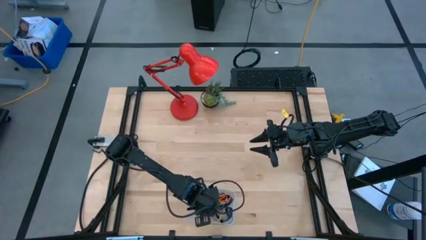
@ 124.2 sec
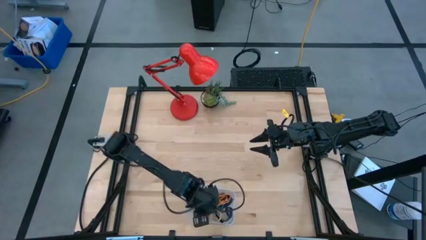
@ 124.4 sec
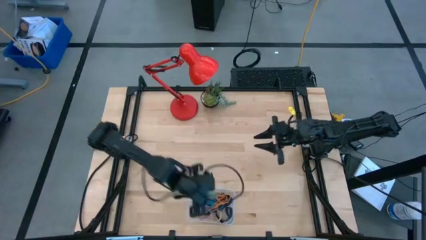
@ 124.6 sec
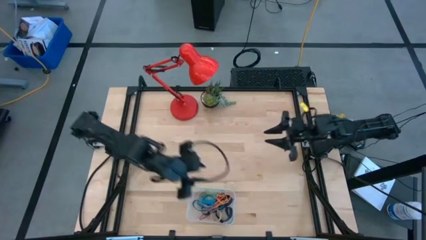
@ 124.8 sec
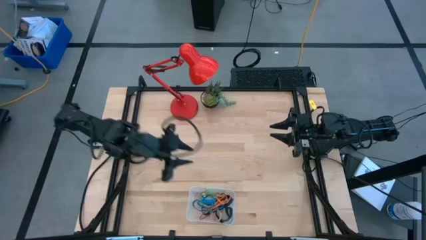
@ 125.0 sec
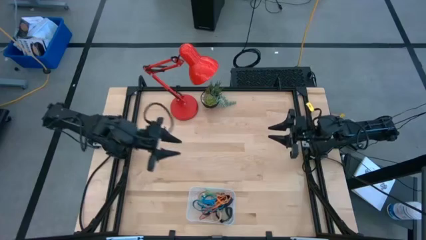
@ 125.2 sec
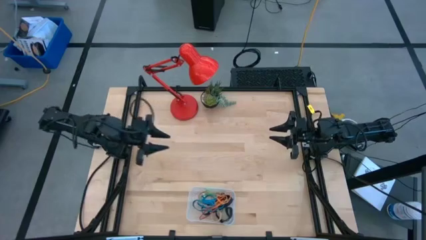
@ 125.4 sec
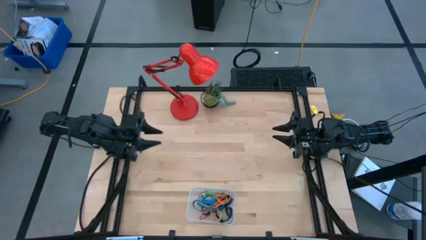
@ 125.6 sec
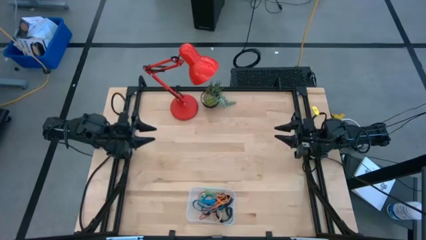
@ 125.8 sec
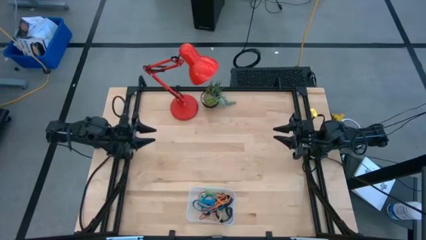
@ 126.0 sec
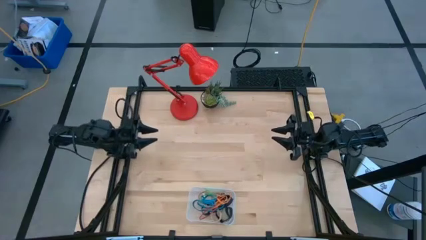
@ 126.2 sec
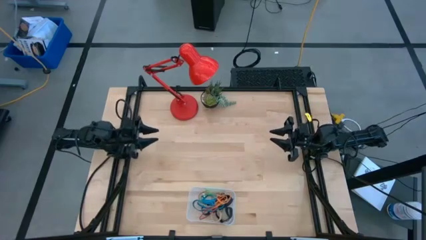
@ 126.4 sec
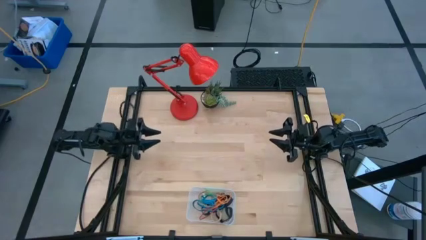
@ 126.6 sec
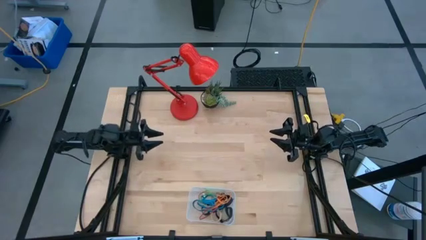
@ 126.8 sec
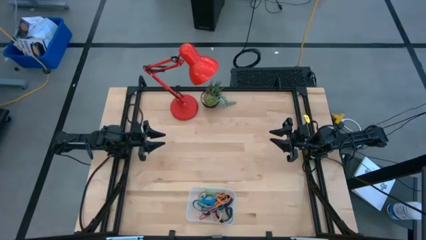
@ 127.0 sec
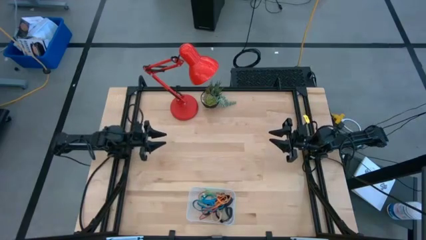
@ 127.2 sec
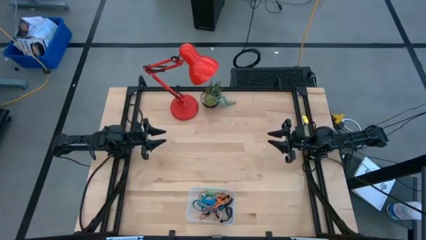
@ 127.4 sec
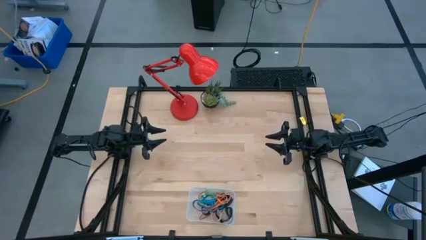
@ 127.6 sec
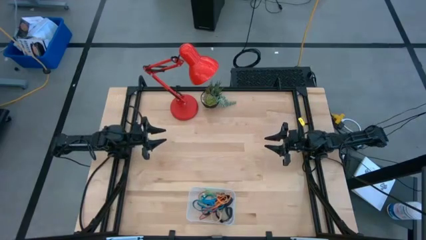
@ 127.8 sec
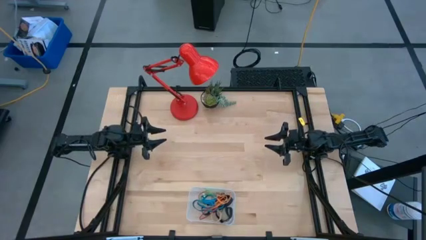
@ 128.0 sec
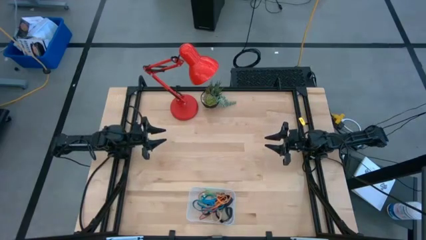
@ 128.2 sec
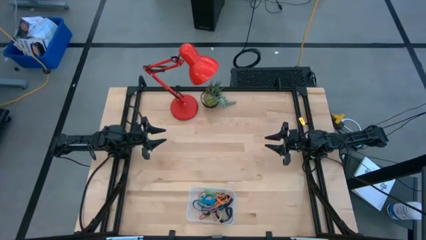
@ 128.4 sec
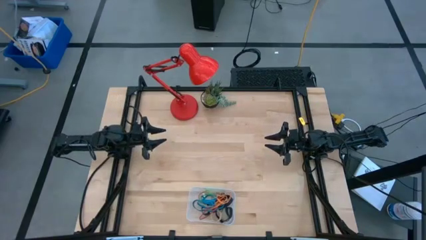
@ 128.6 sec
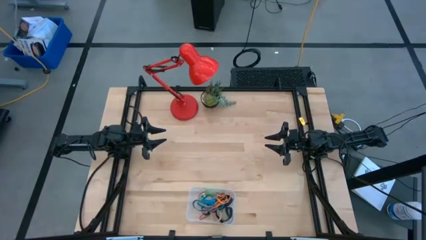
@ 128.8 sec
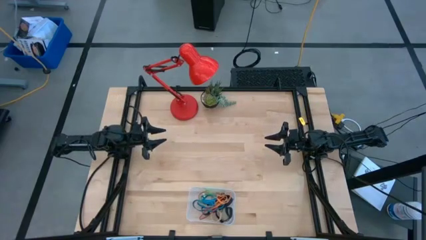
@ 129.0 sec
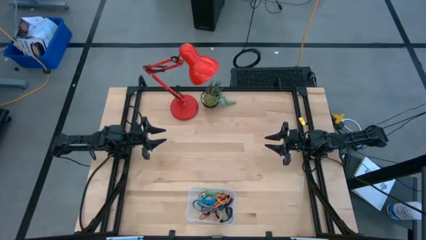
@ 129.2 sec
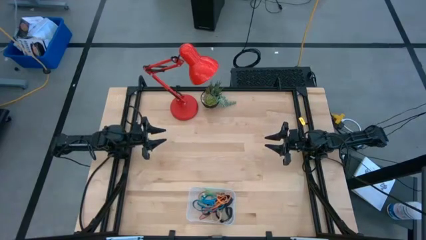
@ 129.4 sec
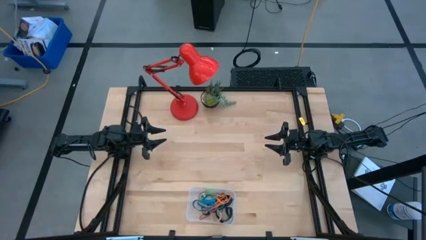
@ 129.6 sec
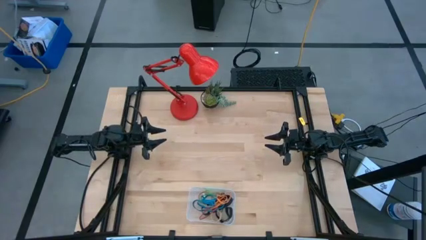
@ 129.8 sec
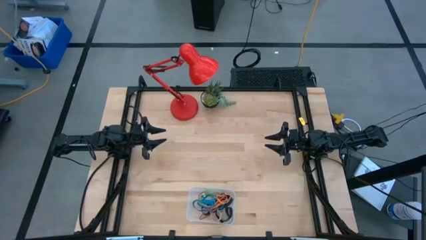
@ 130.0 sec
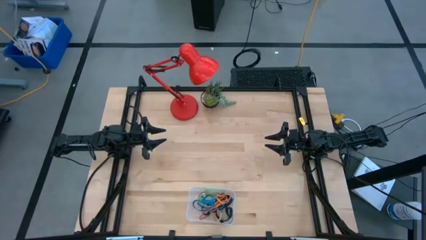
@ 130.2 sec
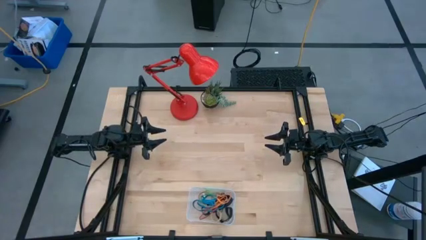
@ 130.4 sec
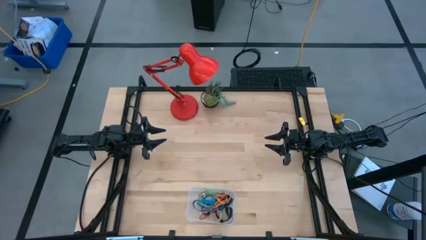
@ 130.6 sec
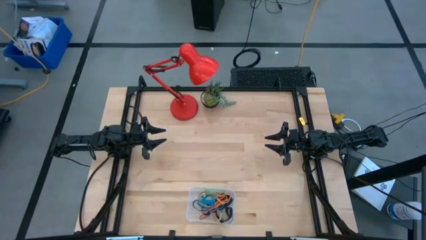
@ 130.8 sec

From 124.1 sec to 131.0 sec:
Task: Pick and place rubber bands into bin
Return to Home Position

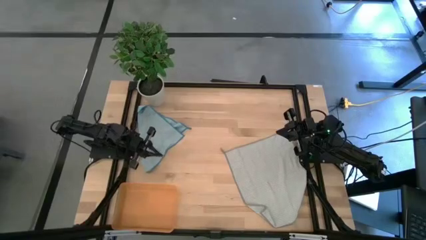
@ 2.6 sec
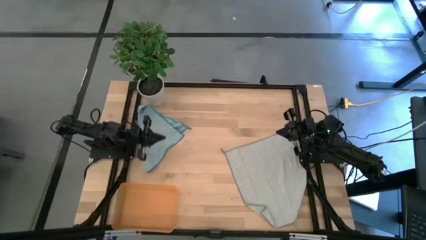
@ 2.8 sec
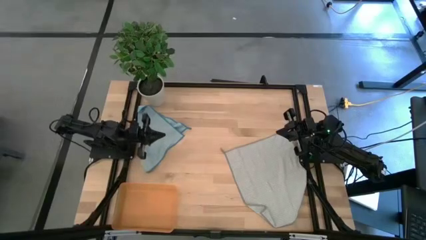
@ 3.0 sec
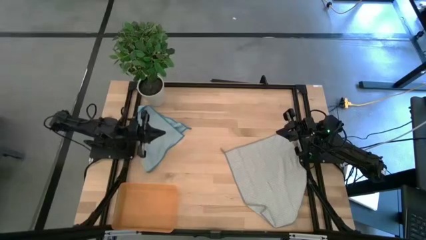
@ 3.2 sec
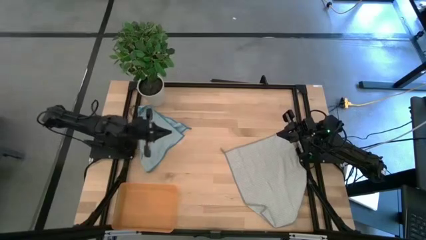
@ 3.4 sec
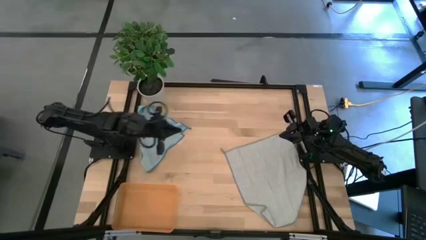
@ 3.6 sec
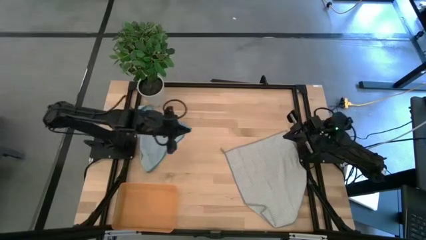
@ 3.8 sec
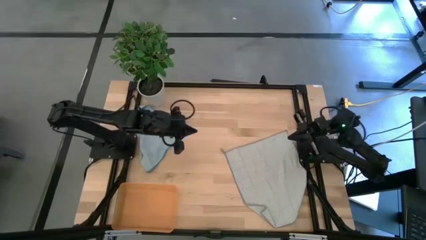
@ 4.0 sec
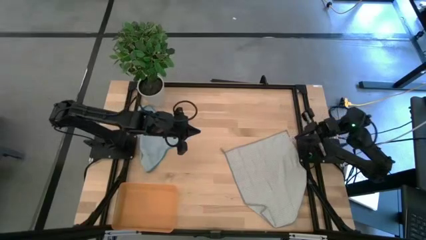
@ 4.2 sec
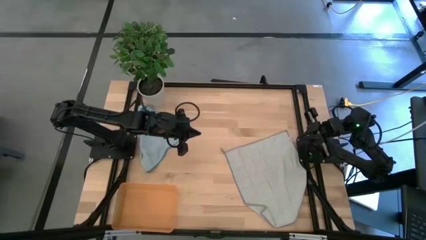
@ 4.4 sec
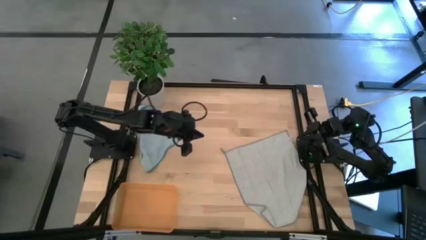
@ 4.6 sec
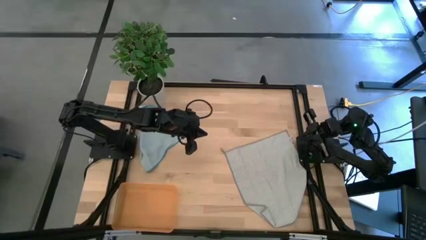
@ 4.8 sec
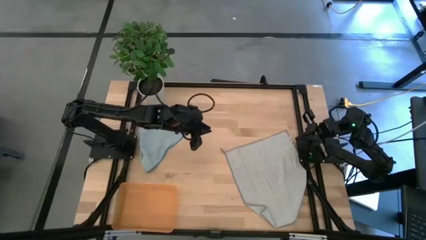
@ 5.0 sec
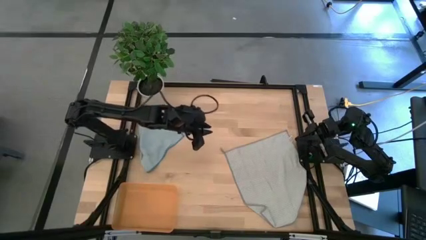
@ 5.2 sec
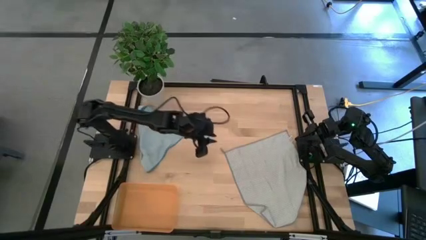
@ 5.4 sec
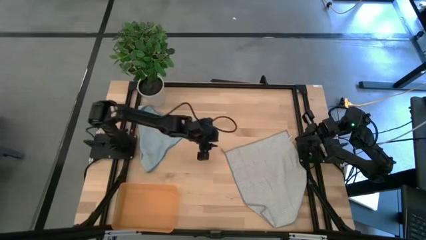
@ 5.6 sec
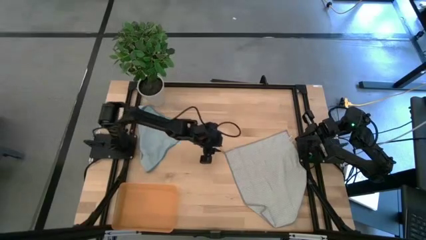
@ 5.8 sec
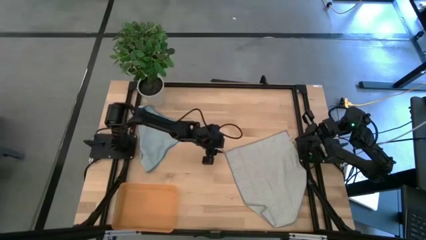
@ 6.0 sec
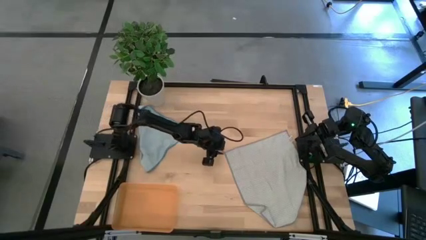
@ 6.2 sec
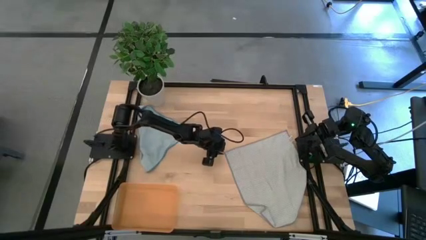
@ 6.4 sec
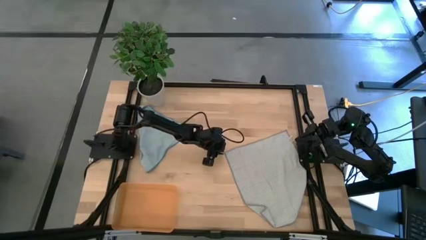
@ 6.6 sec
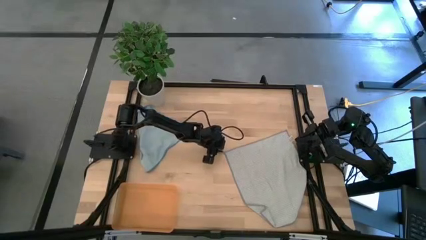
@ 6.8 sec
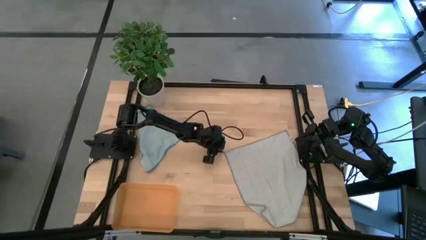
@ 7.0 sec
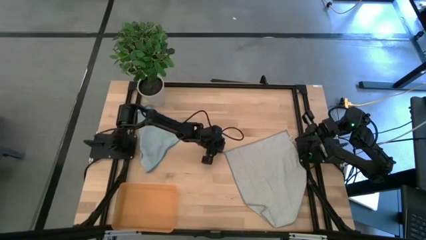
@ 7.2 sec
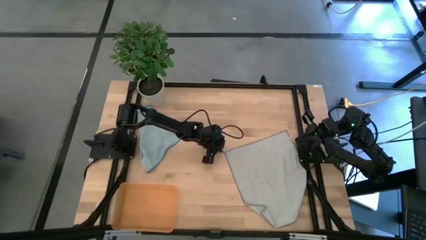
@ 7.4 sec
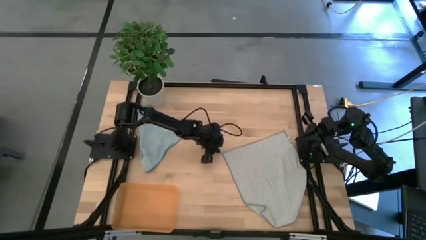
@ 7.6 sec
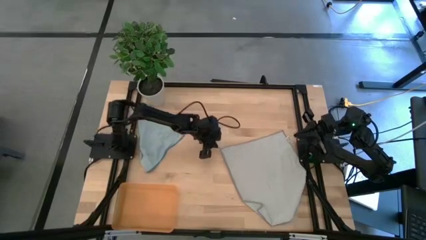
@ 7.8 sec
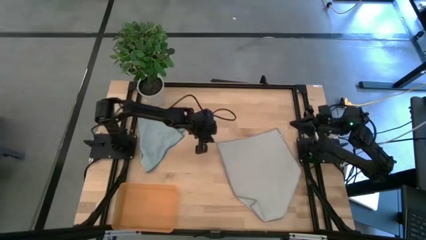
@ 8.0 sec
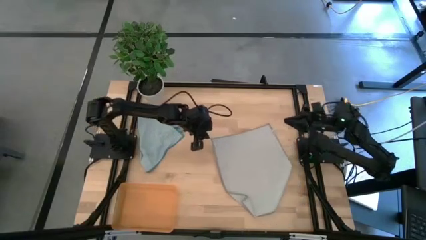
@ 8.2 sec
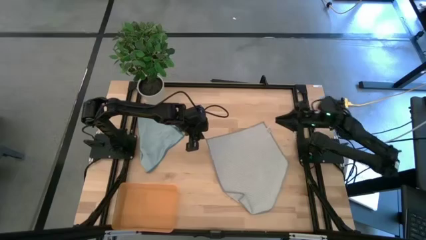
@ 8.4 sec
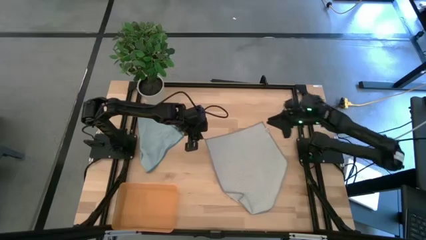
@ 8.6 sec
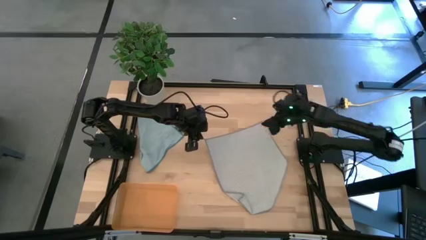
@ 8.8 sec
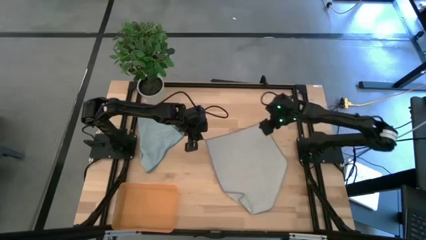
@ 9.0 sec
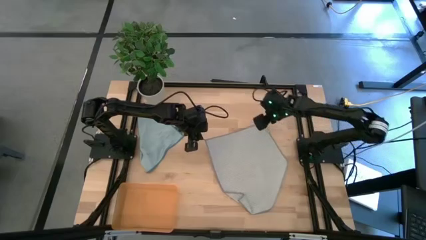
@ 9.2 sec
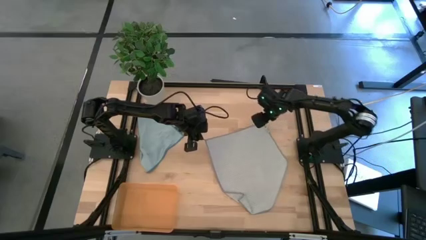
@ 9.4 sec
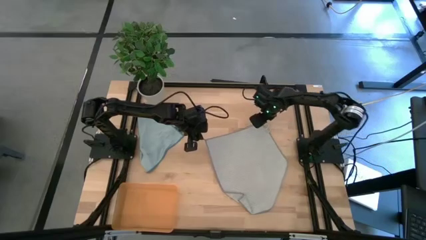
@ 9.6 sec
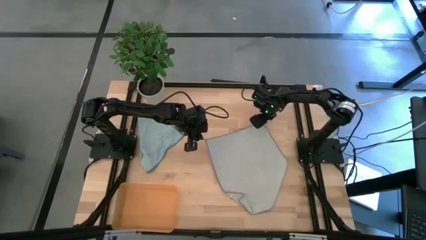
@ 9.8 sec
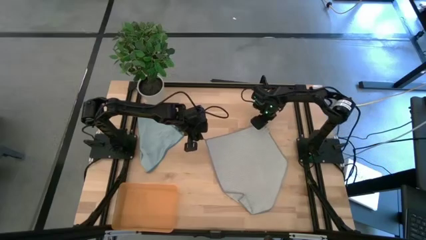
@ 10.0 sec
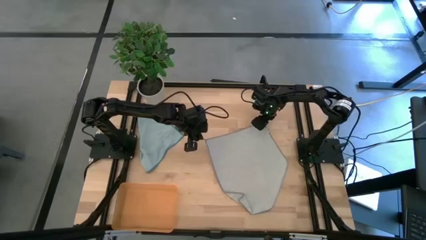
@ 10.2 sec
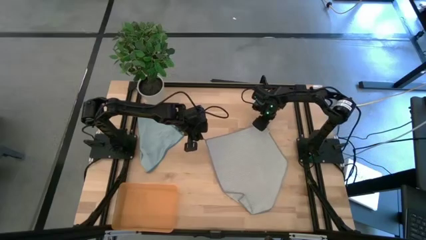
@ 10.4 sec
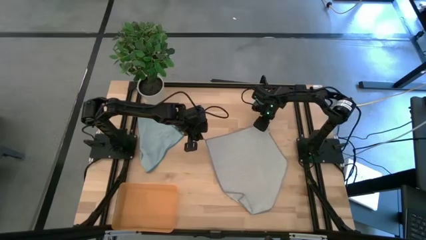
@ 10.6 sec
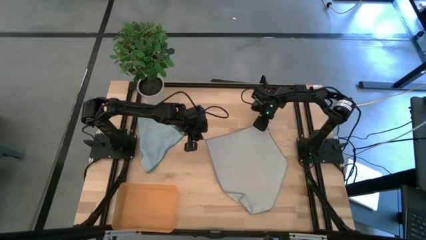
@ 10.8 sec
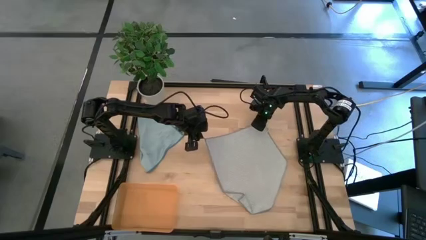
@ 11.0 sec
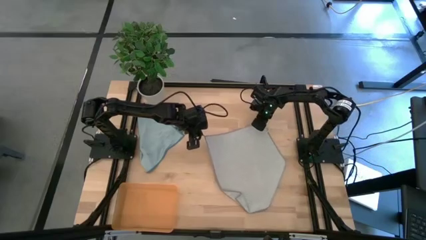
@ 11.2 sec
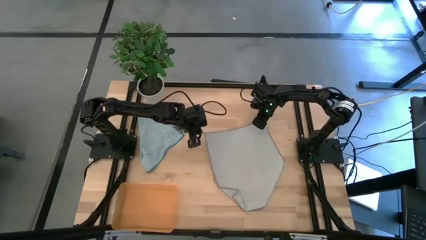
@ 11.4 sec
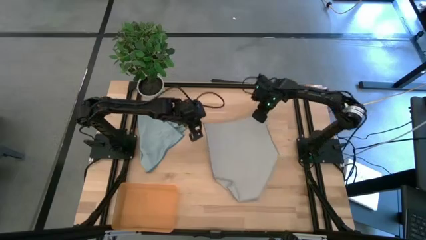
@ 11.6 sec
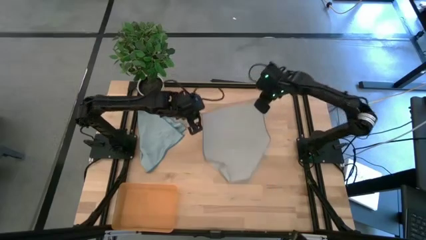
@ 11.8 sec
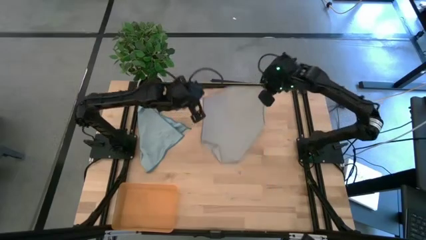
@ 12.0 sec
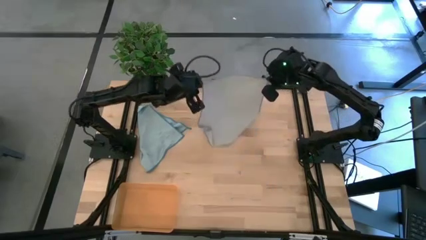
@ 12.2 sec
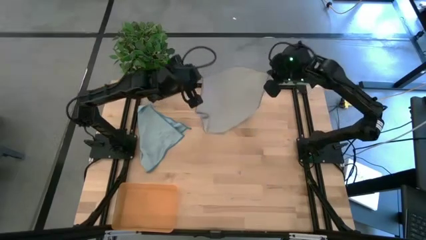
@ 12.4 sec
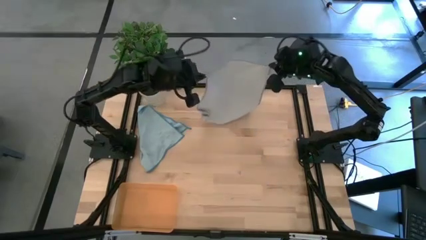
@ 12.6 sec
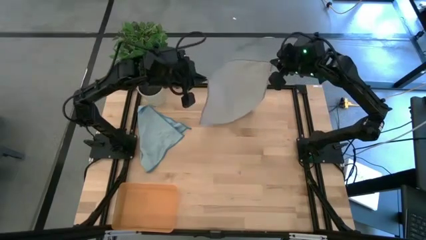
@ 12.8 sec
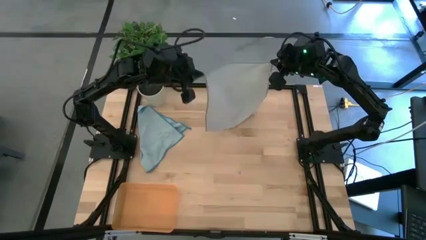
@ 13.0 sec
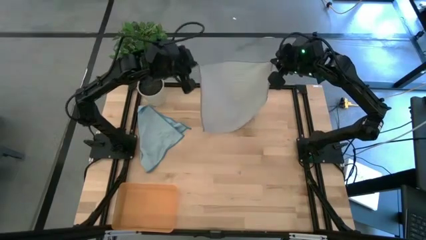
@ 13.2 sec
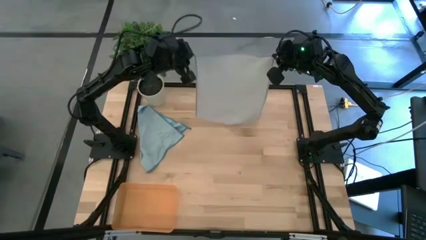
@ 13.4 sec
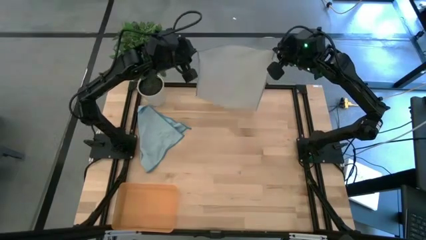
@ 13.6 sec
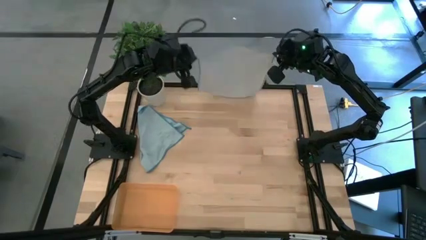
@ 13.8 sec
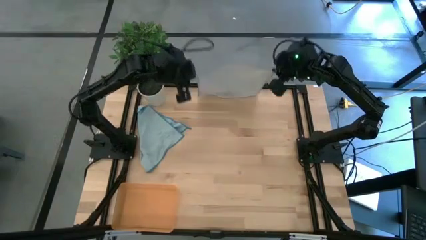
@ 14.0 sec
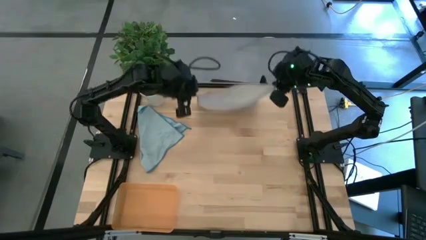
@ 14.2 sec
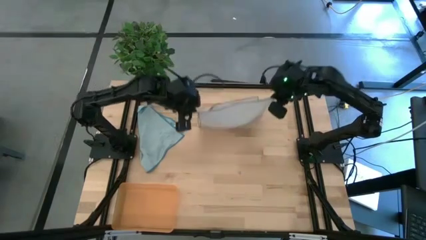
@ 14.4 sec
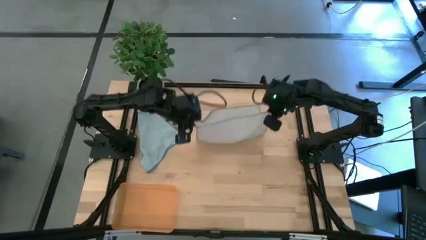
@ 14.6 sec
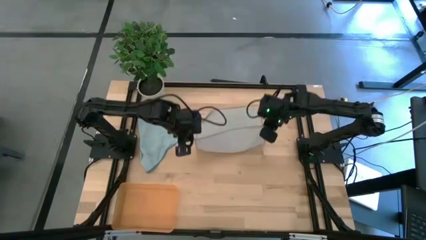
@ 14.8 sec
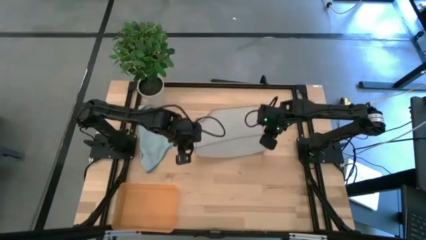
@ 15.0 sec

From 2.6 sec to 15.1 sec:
Task: Roll microfiber towels into tight, uniform cylinder then place into a basket
Fold the gray microfiber towel
